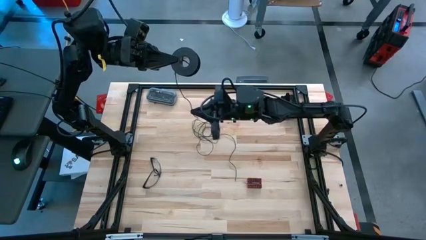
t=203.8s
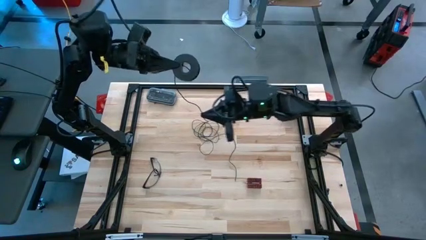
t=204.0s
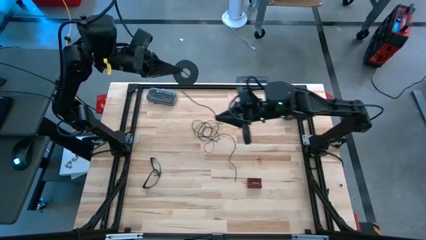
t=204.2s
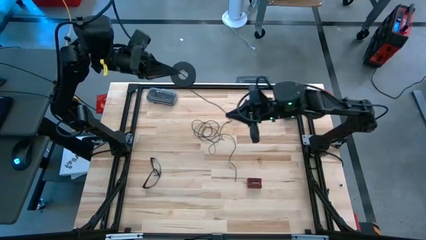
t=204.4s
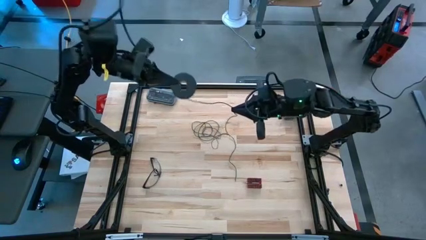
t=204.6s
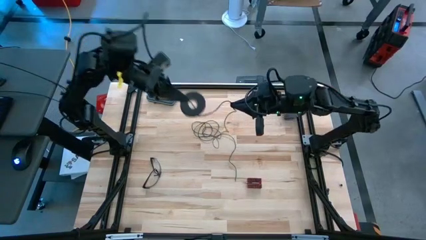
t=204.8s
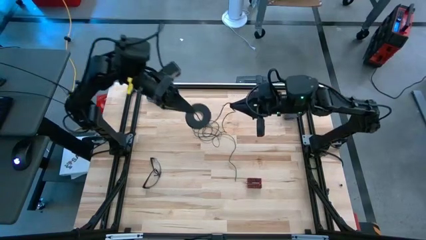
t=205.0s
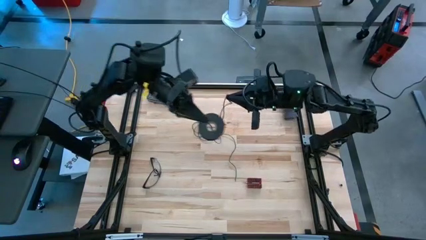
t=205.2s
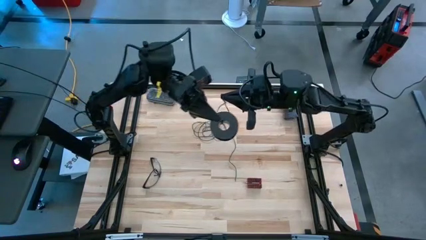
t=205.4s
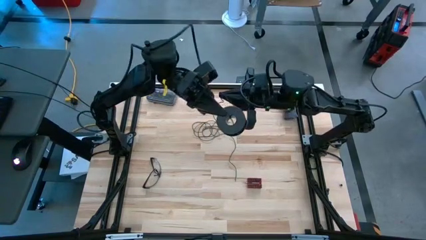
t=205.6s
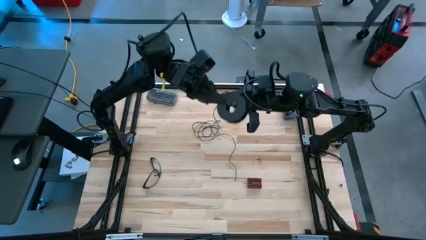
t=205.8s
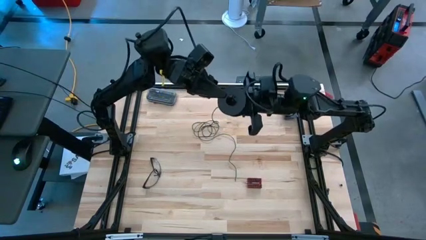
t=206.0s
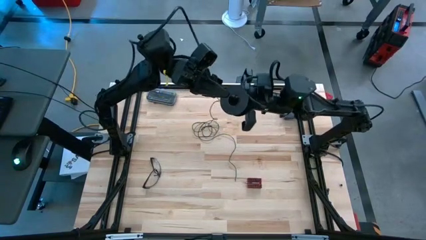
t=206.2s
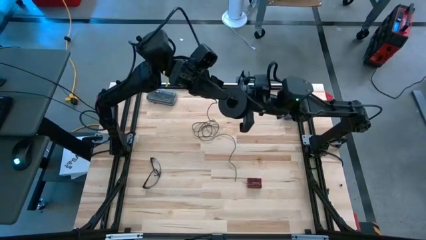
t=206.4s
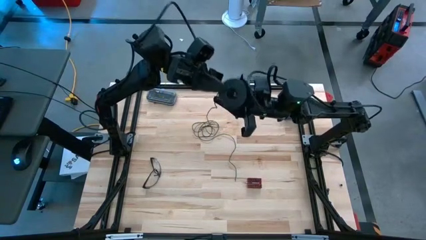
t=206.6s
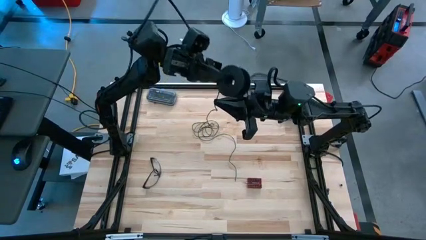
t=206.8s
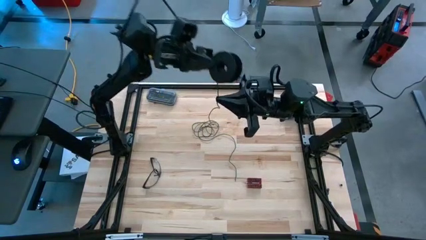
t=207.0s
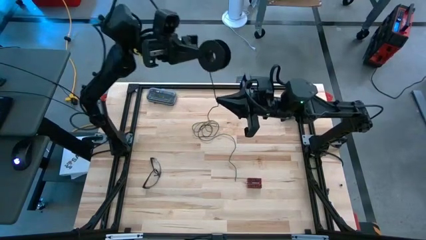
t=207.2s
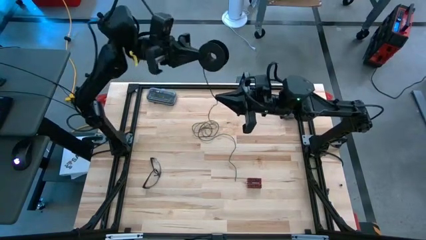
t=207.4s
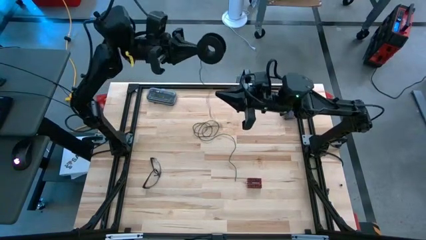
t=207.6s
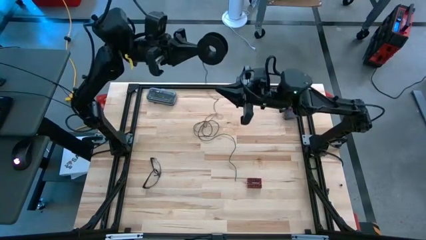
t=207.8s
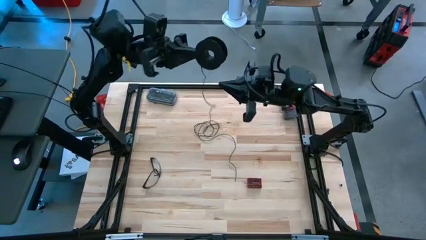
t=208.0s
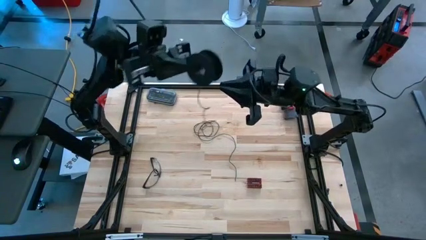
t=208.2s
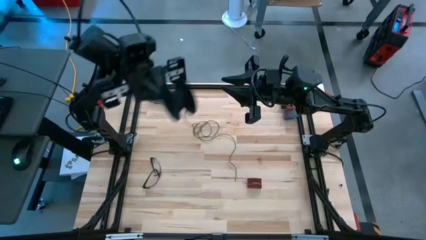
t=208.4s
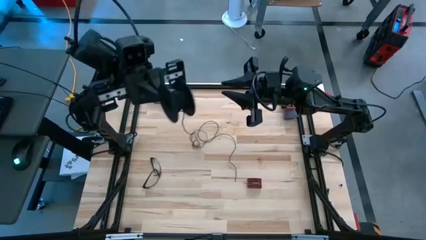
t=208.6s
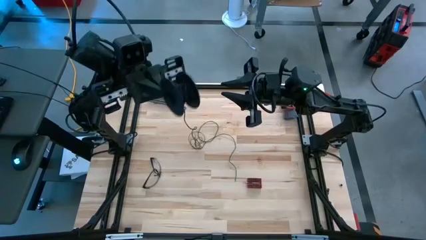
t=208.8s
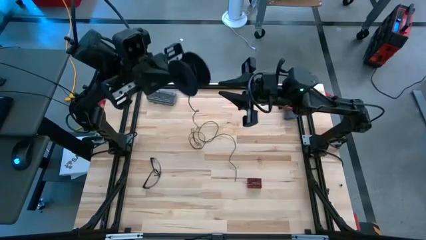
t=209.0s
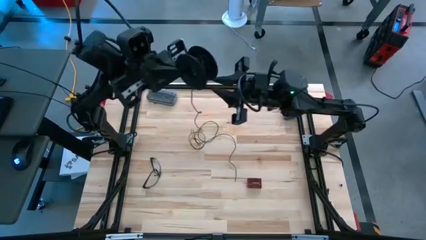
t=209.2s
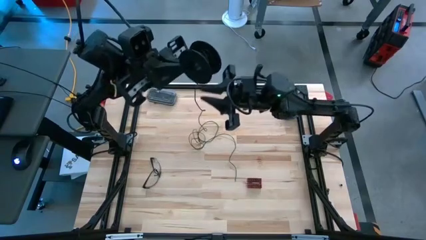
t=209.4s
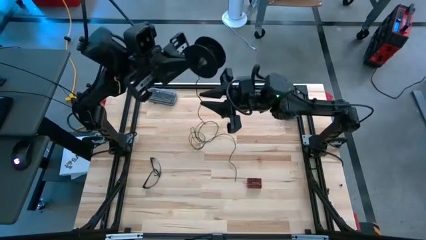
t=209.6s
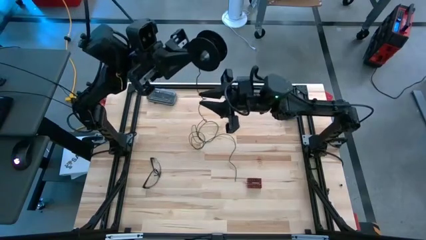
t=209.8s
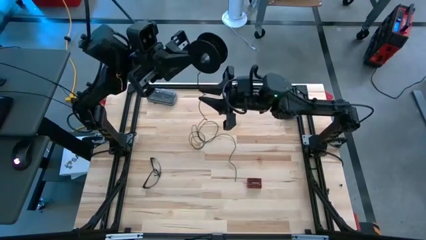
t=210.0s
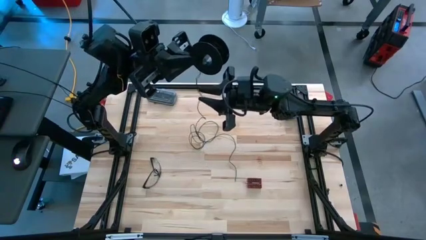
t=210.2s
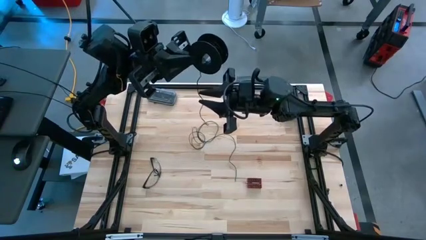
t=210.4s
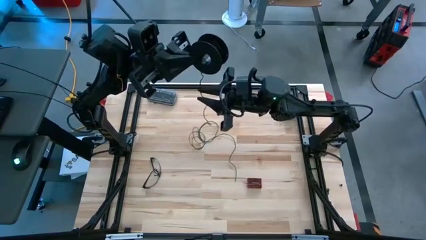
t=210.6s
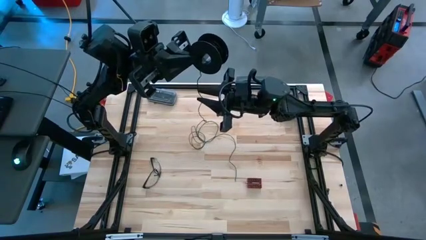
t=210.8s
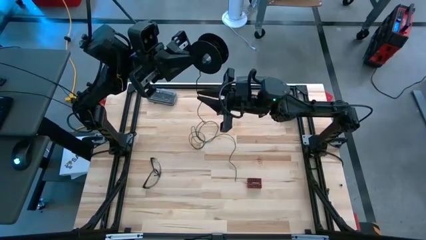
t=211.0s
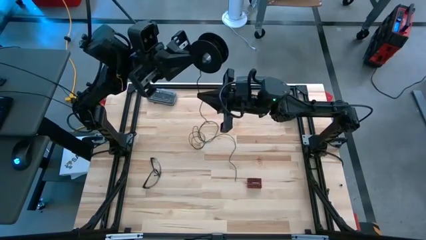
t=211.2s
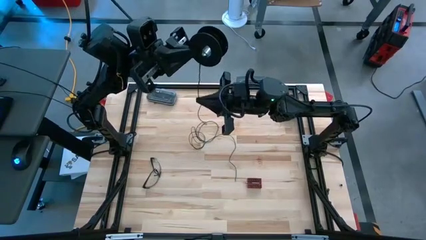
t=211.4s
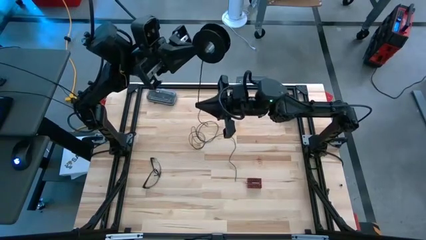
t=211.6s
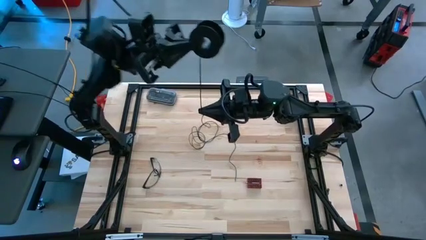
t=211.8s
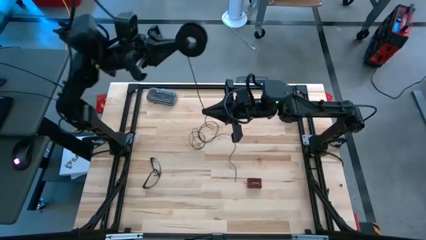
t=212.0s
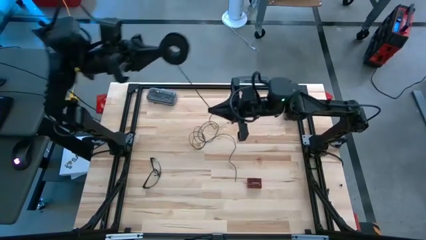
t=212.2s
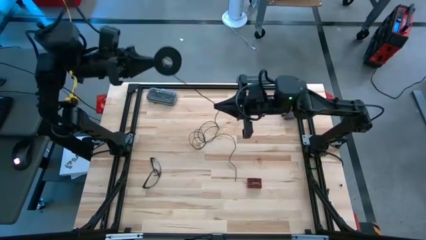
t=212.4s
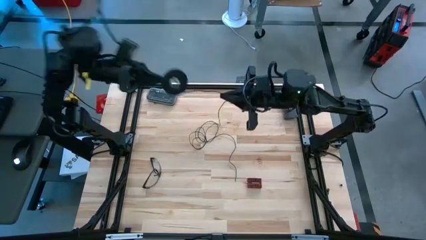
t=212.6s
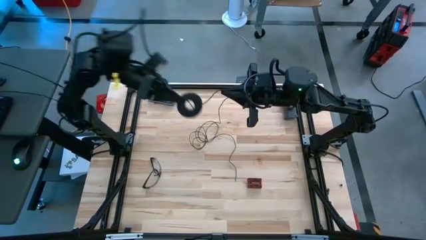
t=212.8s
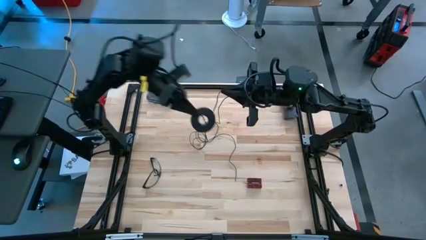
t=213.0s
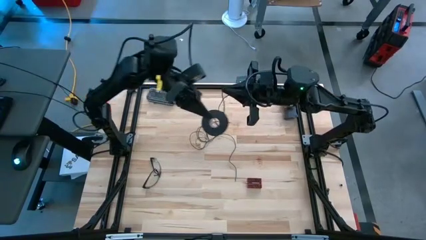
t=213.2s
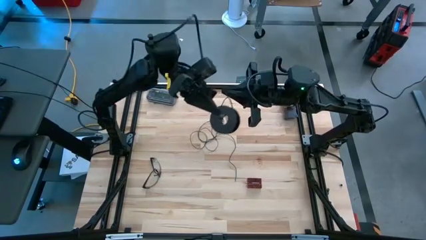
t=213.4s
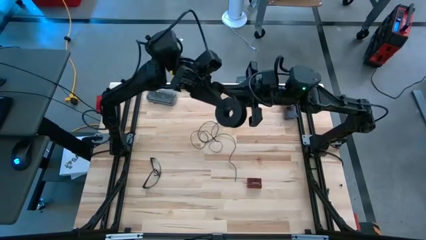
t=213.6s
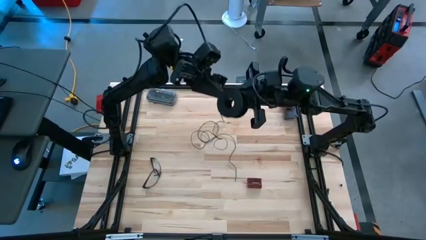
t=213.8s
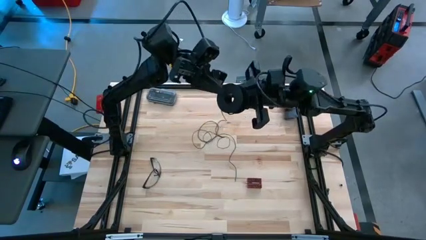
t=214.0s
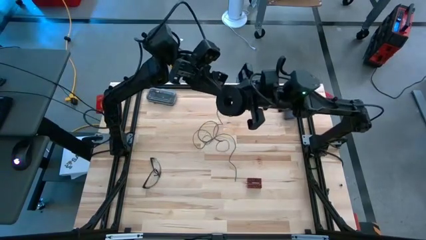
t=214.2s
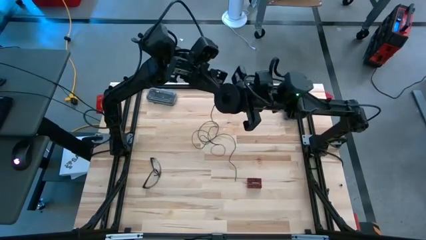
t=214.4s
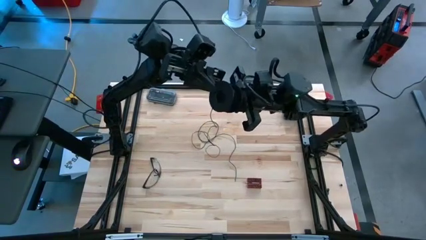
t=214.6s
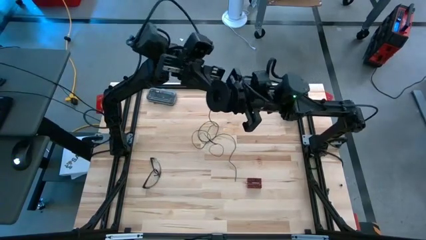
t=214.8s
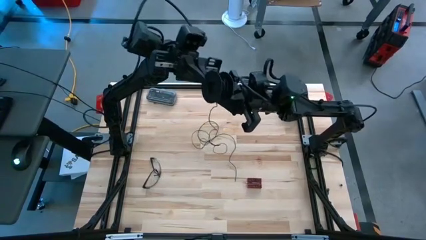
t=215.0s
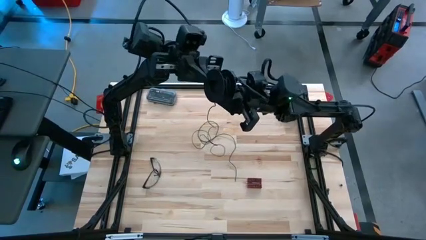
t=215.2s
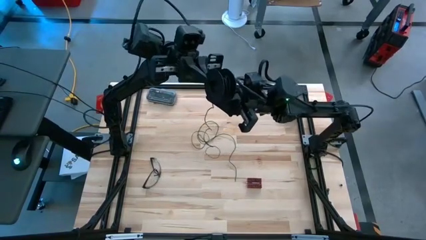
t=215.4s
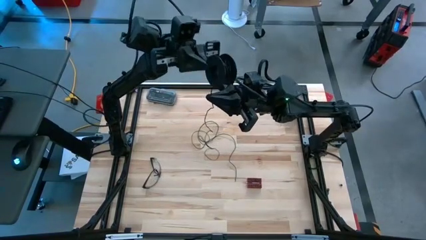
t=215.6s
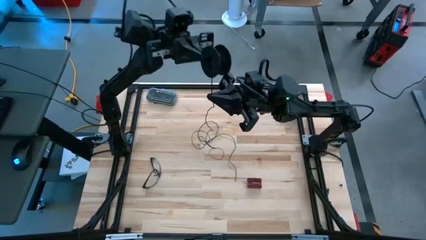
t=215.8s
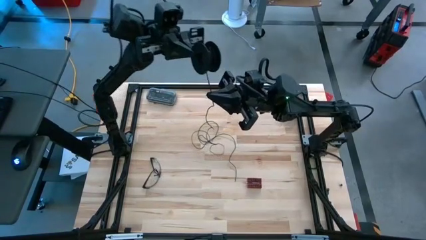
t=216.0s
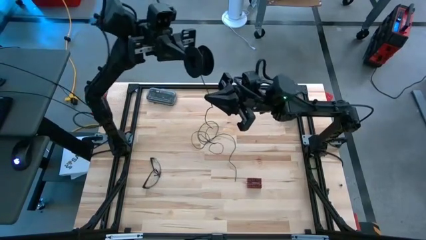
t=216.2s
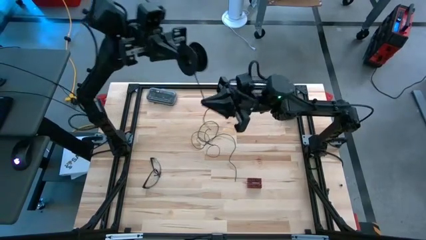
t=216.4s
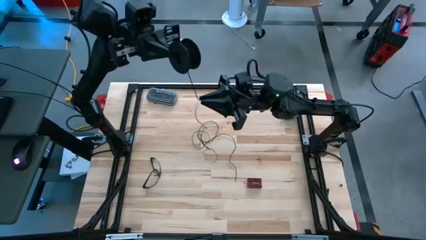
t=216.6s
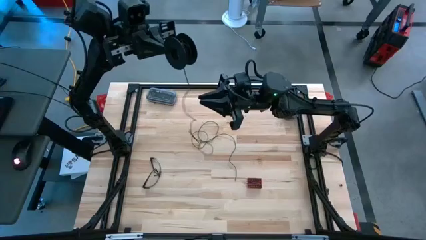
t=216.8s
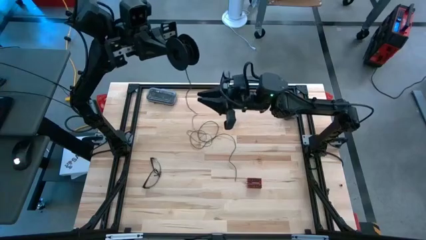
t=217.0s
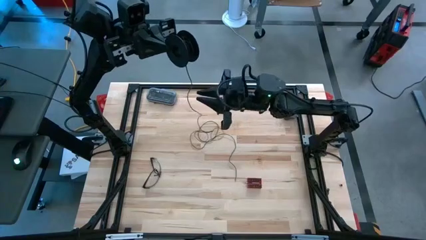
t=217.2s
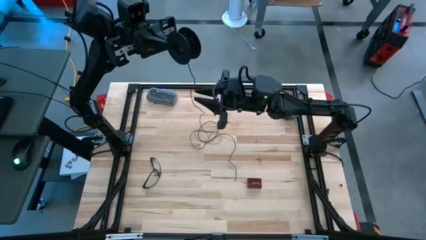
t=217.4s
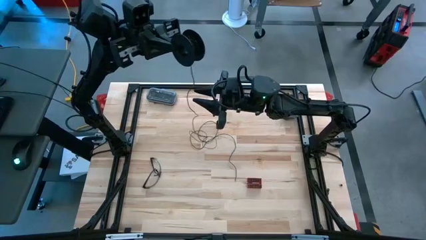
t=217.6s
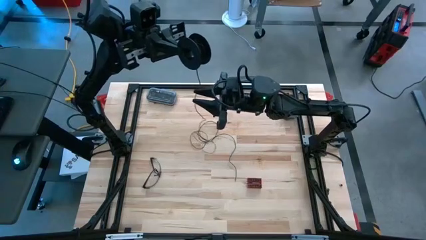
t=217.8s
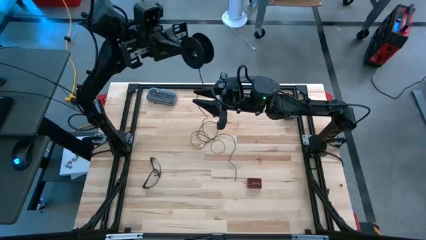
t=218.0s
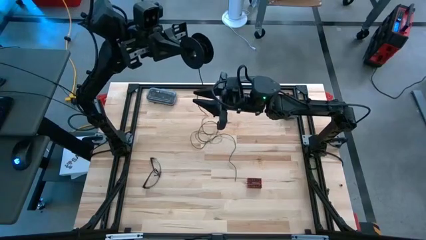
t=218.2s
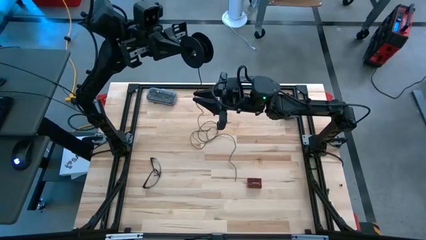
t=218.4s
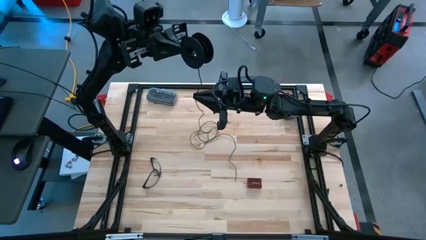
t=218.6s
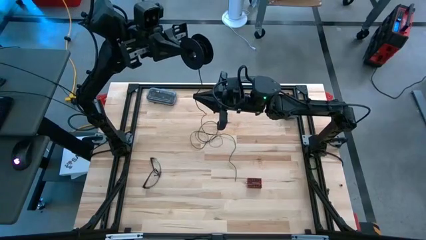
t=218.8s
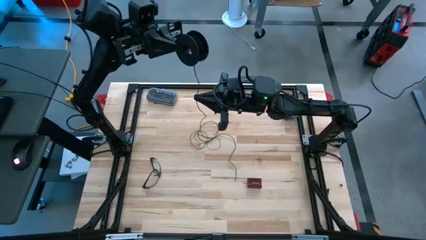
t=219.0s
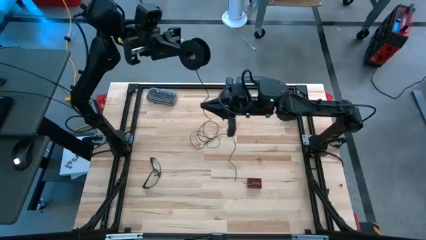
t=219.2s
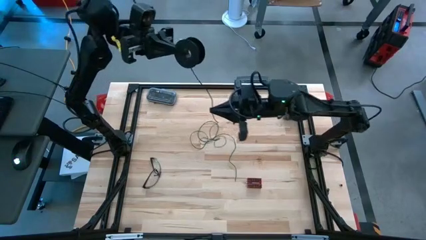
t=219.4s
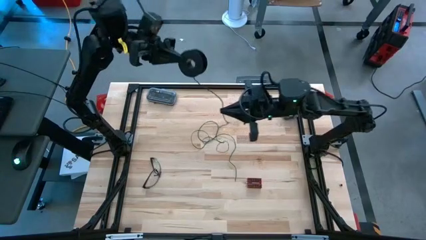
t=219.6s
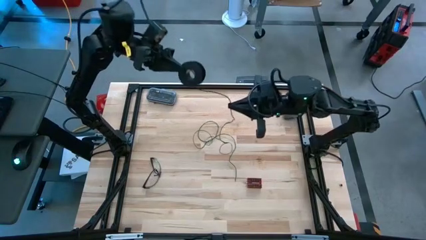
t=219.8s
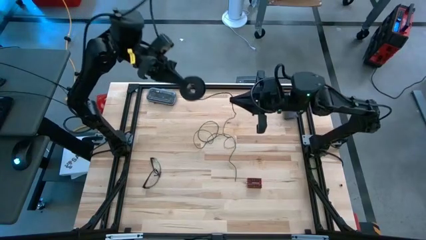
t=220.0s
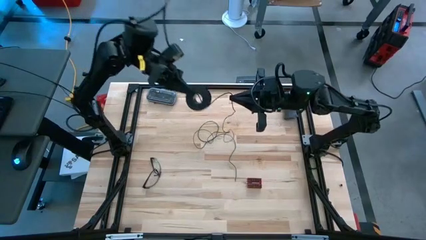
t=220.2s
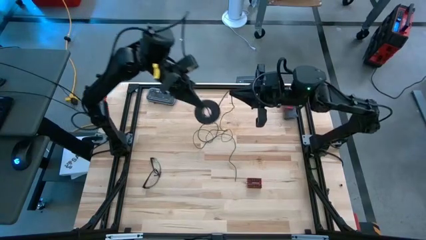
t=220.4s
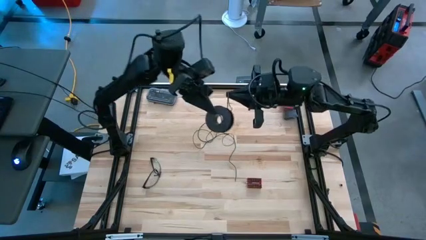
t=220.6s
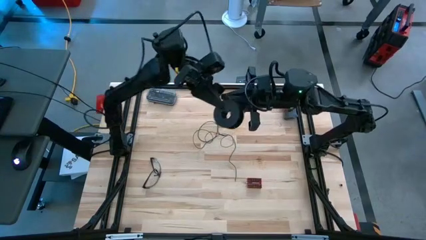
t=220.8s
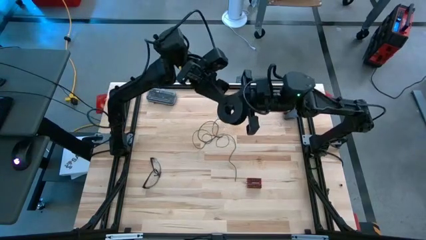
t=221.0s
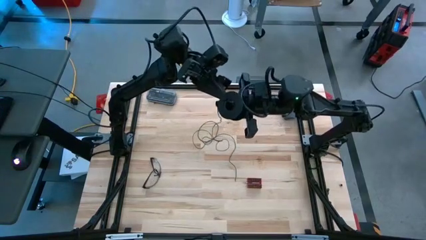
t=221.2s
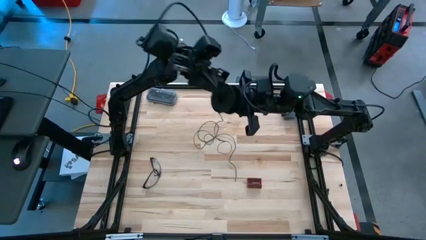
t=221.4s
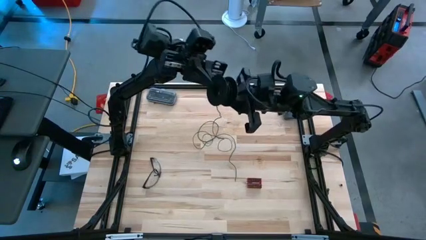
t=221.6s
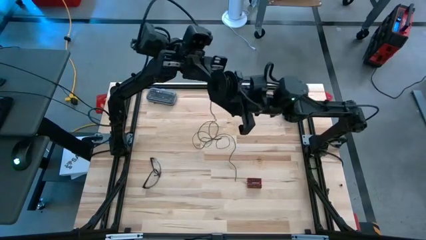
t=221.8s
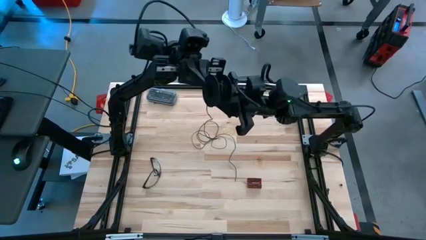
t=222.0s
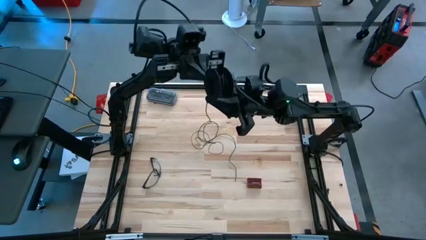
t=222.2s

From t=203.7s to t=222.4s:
Task: Coil cords
Coil the black wire into the spool
